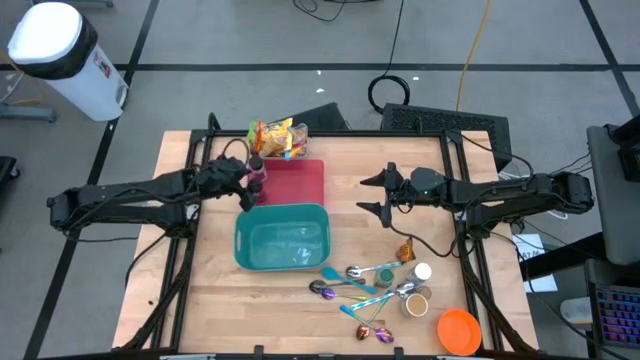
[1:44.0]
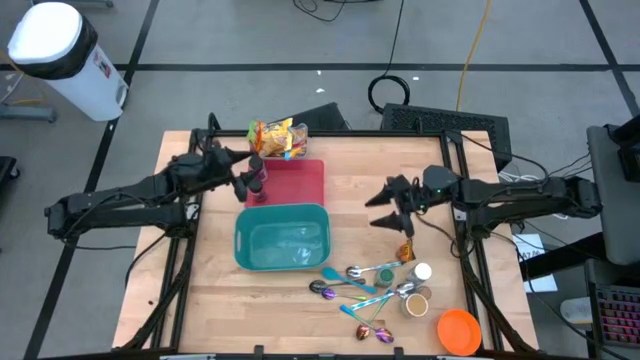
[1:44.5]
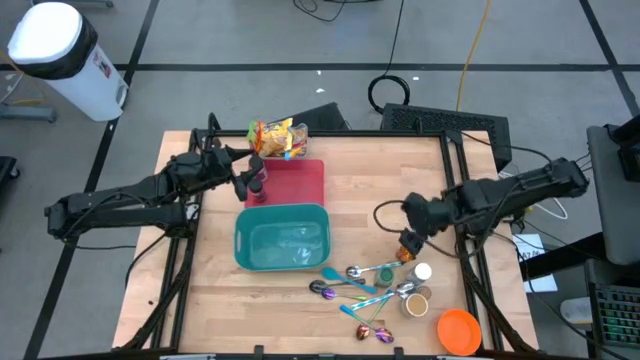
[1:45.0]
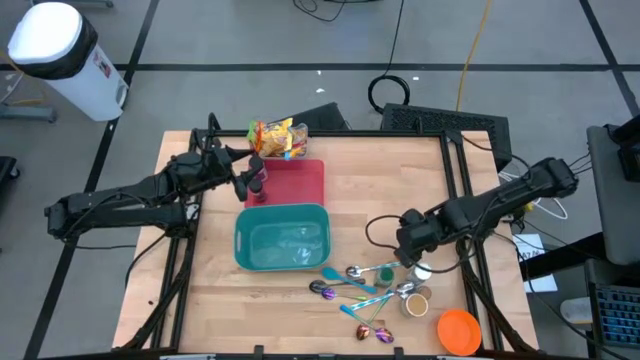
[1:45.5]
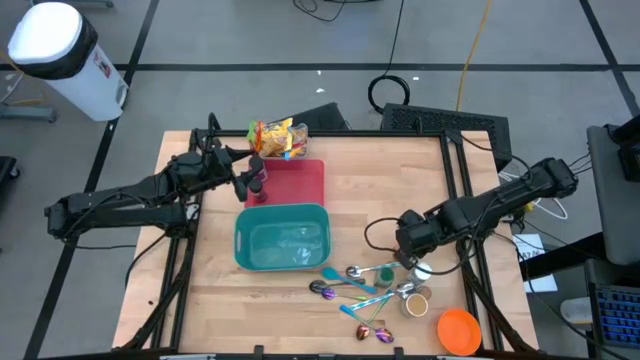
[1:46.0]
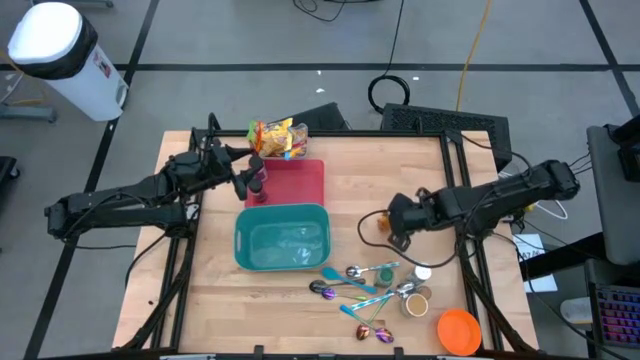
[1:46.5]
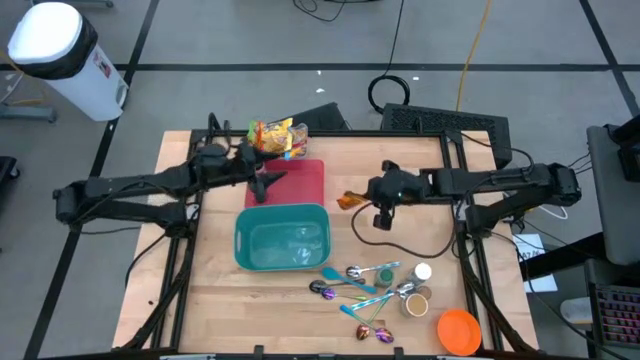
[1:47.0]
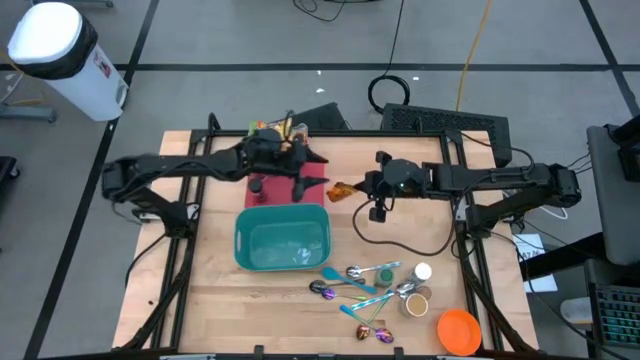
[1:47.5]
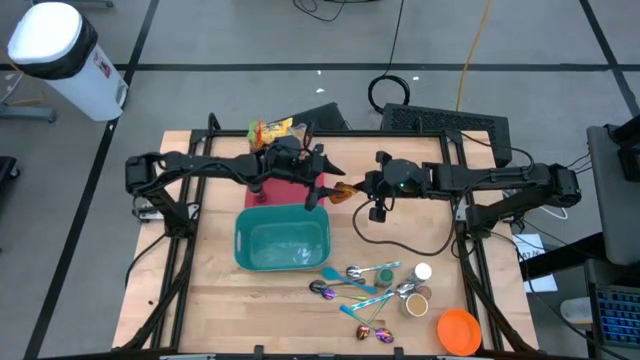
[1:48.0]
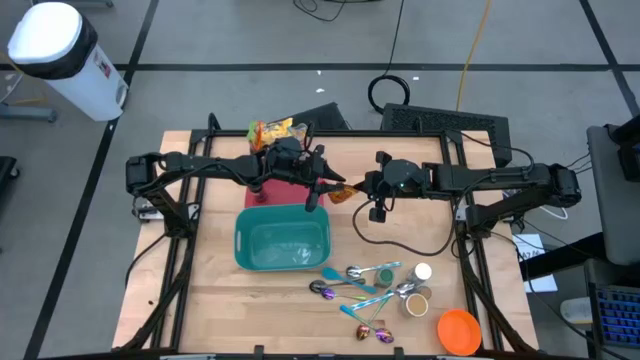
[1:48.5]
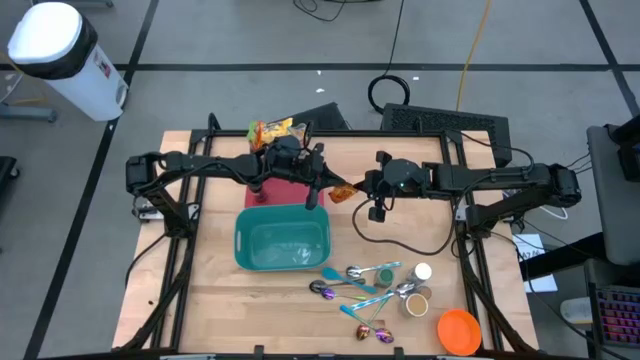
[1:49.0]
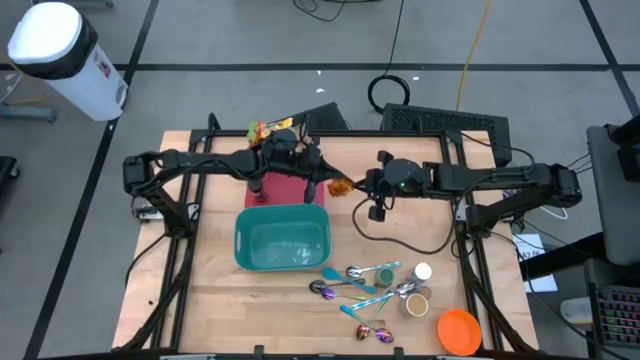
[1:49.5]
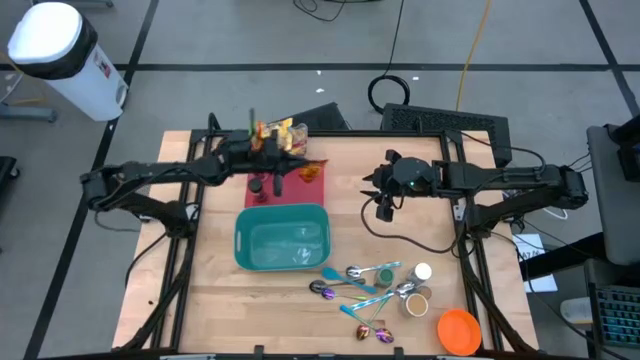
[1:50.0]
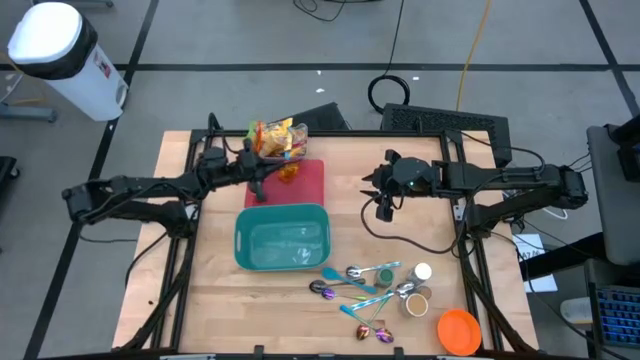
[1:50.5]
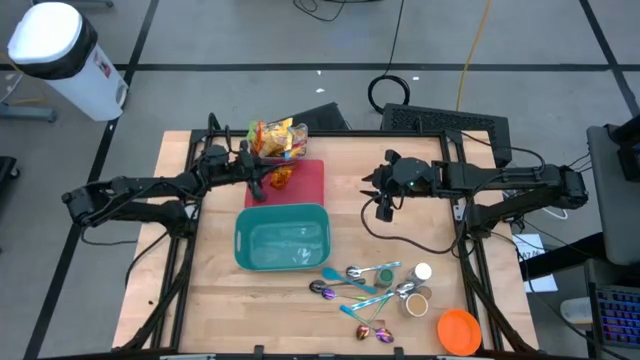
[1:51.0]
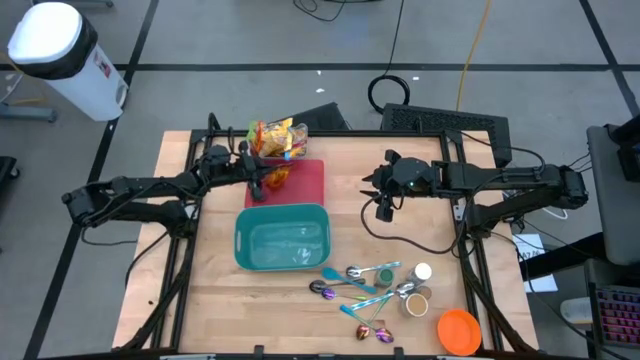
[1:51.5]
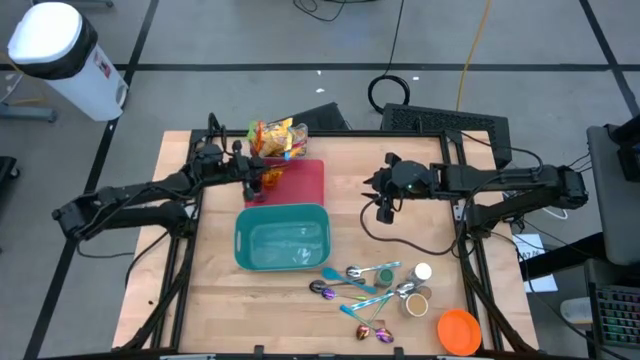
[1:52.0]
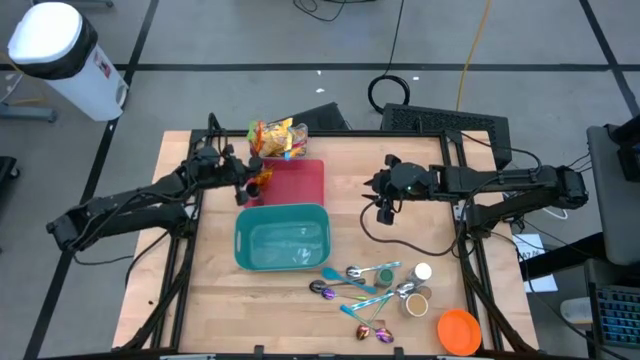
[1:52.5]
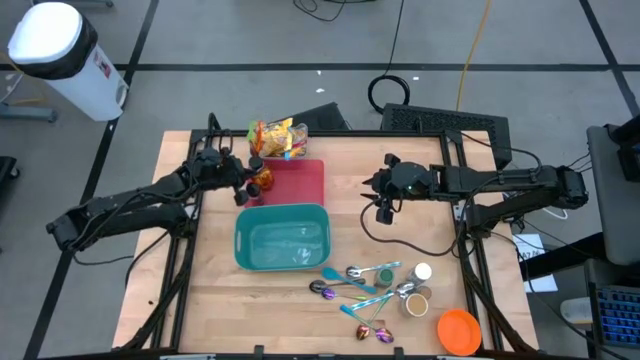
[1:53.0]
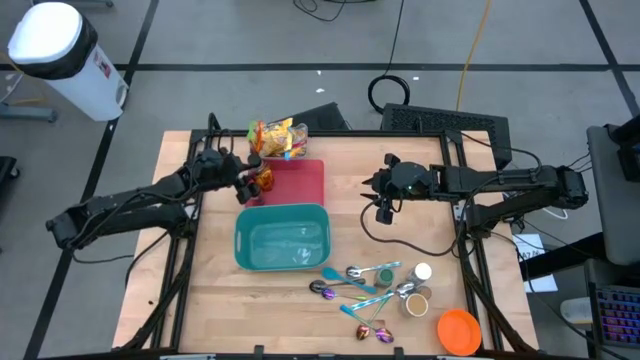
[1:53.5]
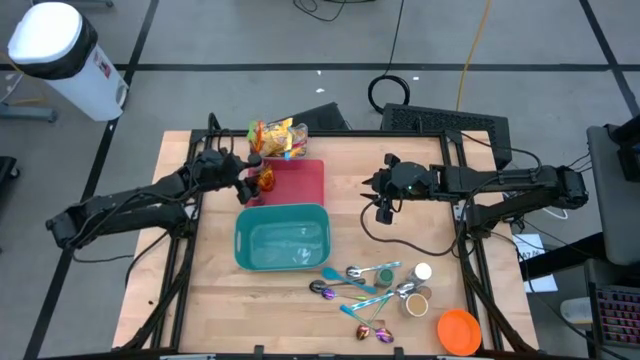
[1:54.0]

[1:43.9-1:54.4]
Task: Pick & Place Food Item
Put the orange seasoning bag into the red bin

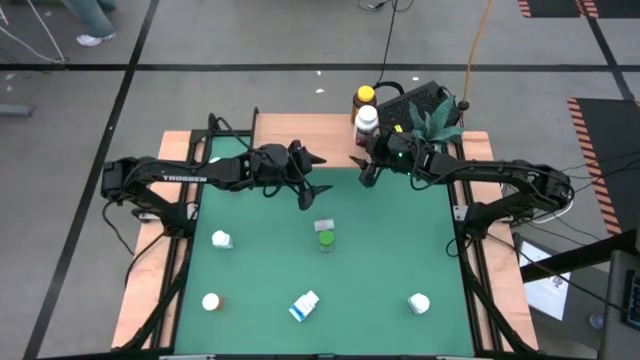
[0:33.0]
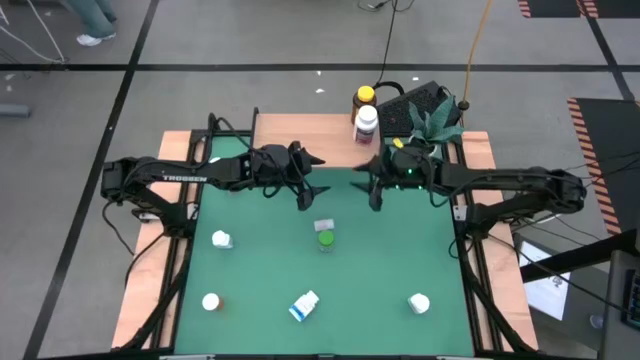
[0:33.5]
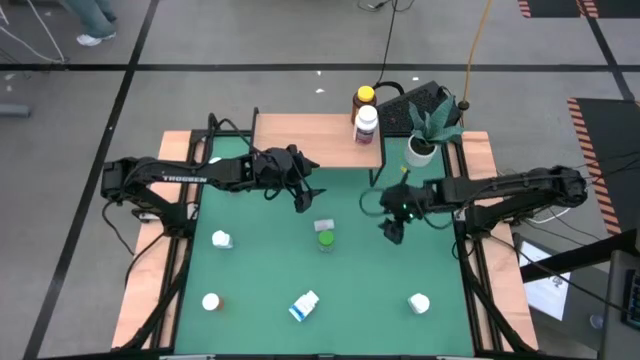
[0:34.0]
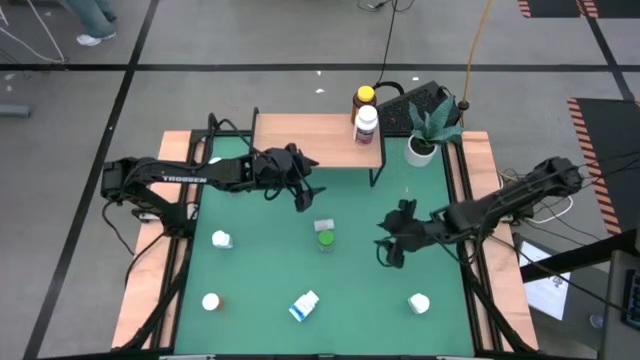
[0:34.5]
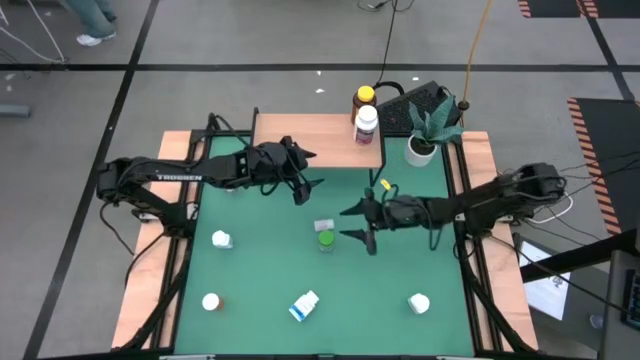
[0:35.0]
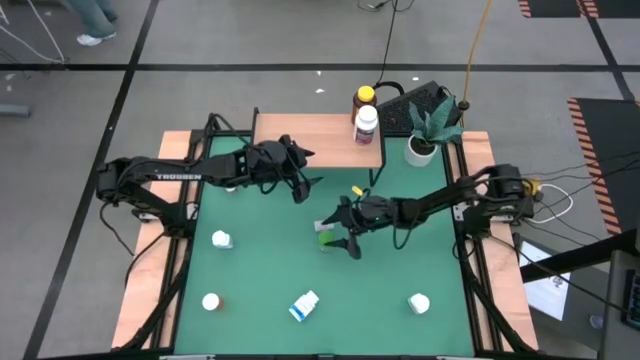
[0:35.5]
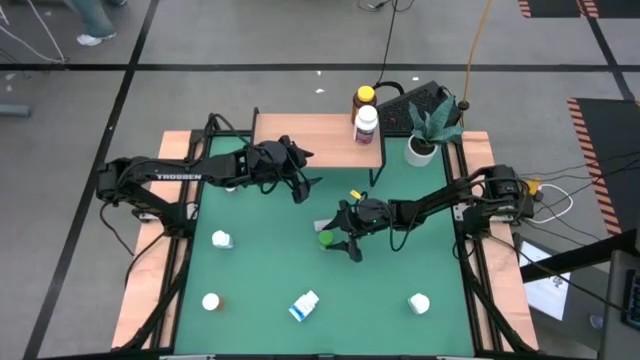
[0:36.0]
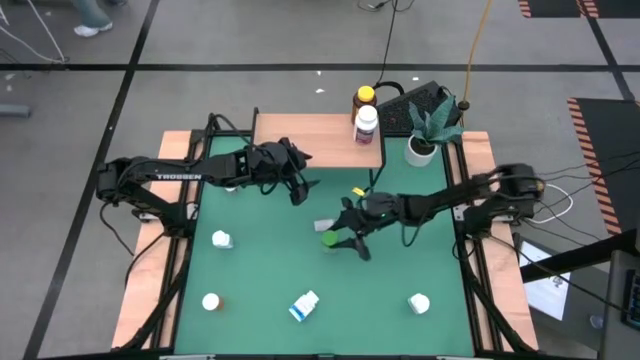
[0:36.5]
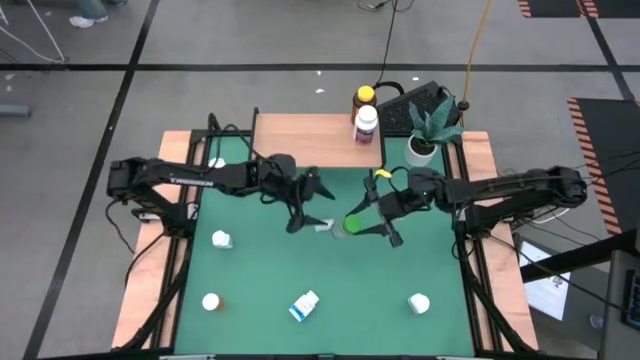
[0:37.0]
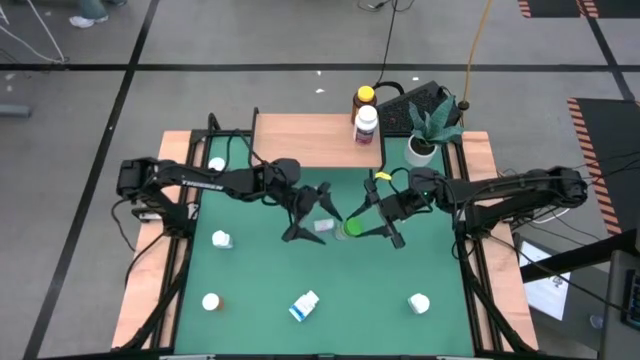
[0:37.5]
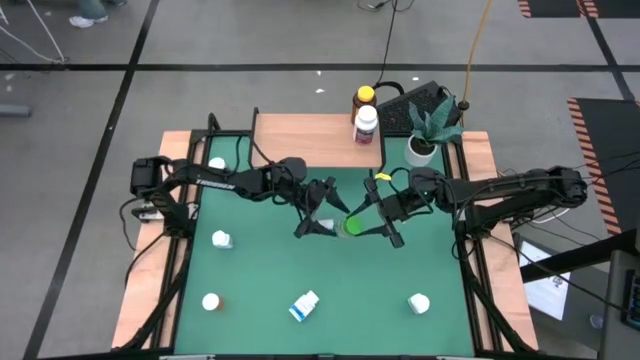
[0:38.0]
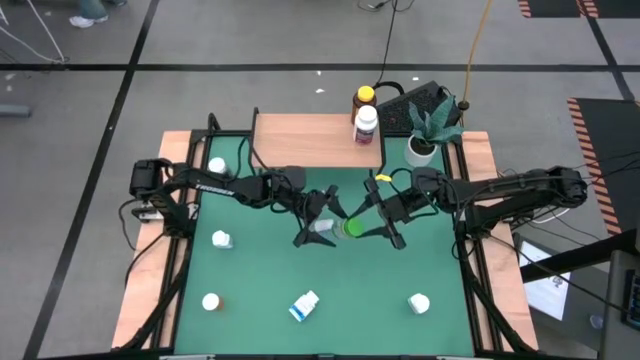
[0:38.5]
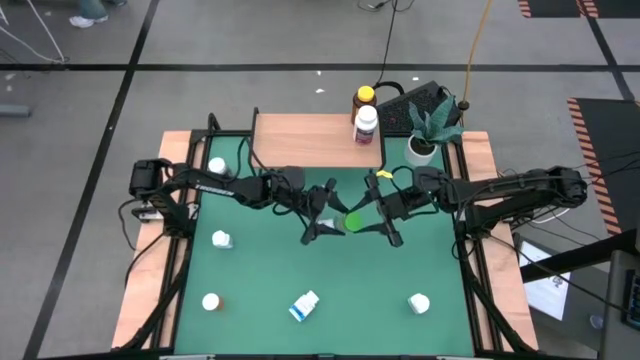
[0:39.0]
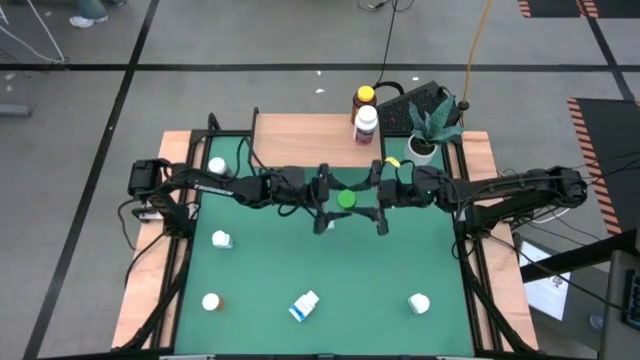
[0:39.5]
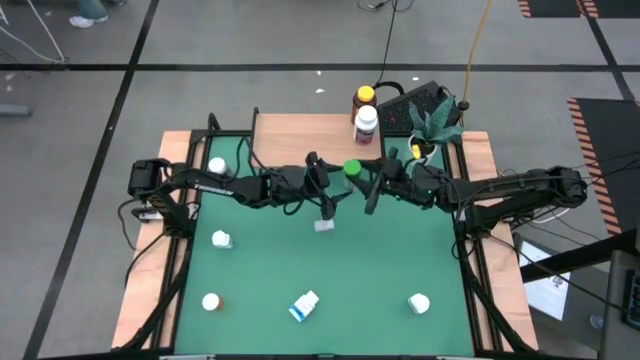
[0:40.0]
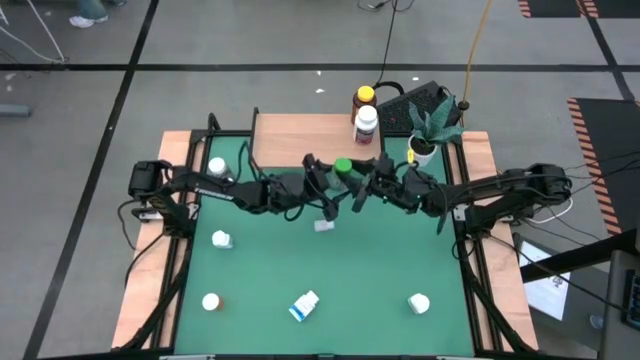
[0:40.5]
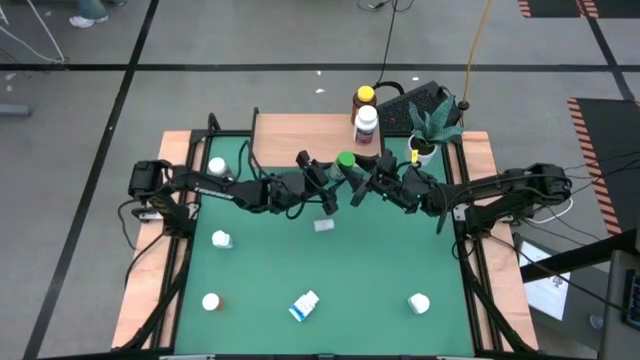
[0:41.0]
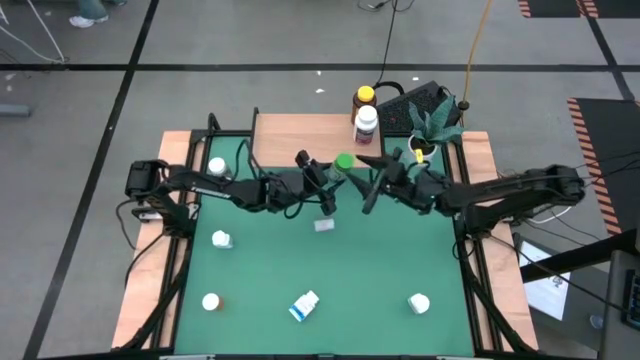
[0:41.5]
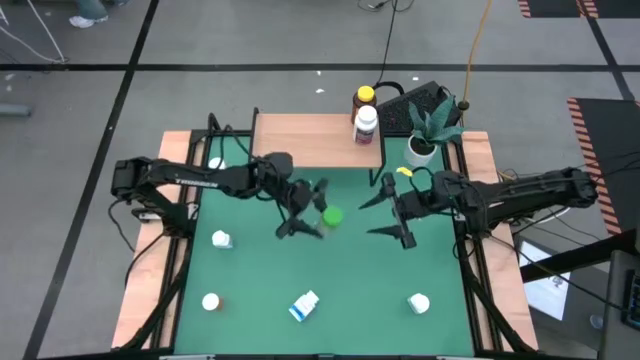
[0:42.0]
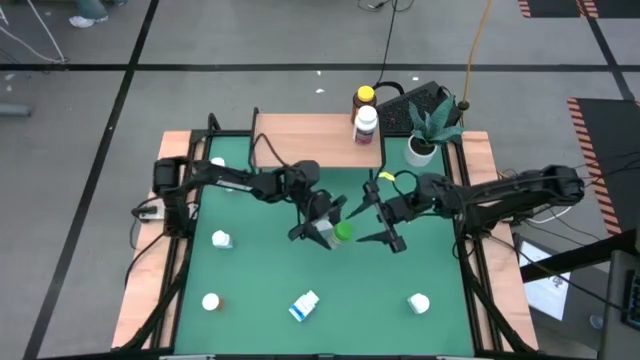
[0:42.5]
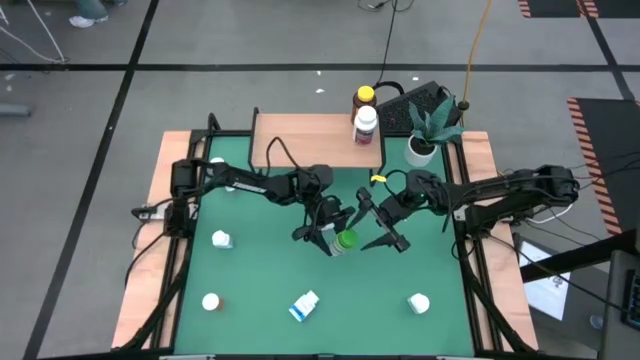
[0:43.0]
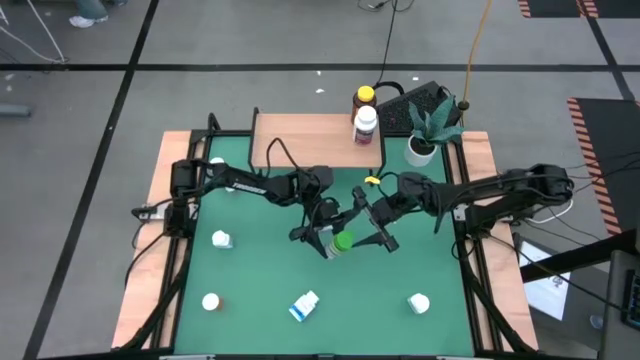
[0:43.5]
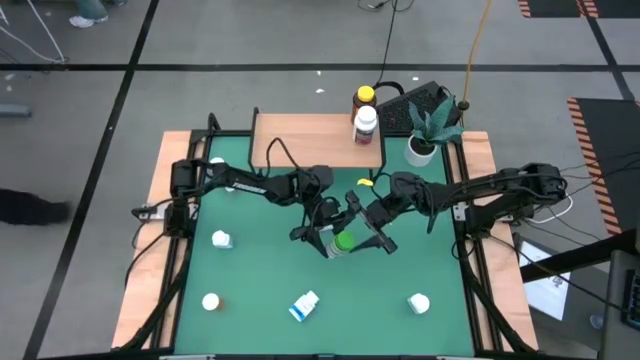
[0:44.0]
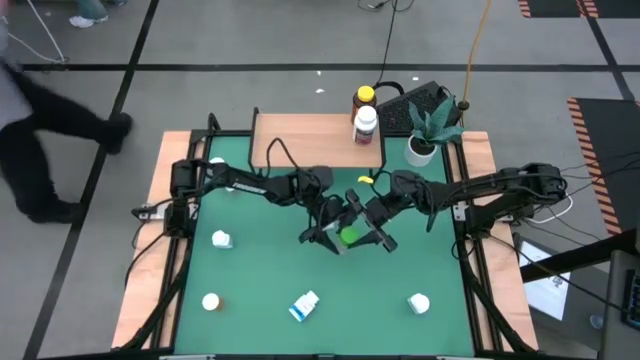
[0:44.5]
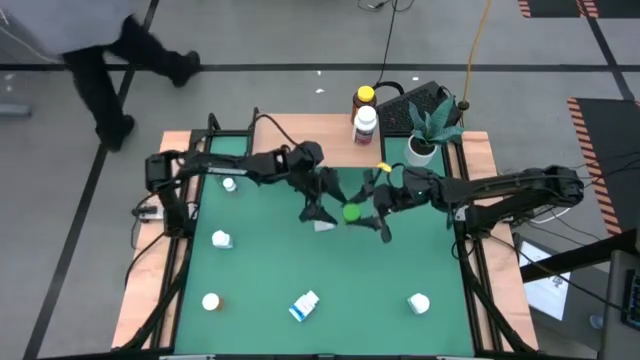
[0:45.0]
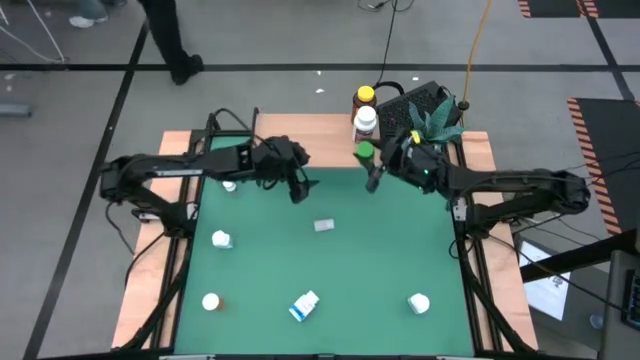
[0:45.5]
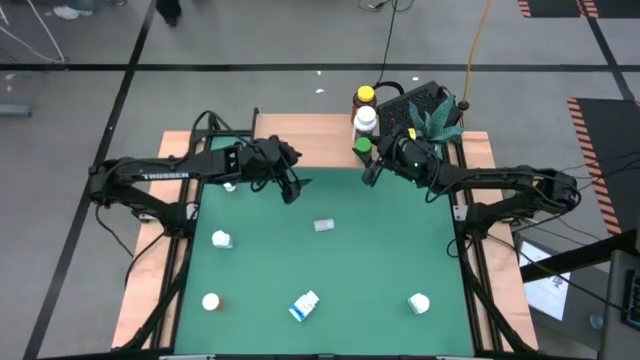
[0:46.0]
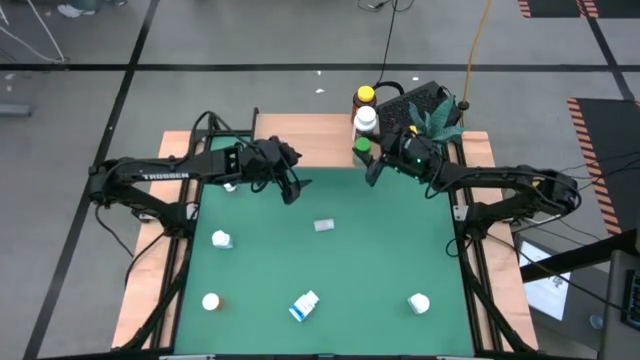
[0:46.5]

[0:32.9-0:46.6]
Task: Pick and place medicine bottles onto shelf by color
Put the small green pill bottle on the shelf
